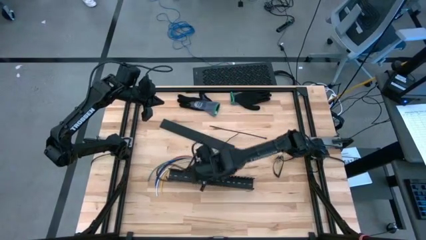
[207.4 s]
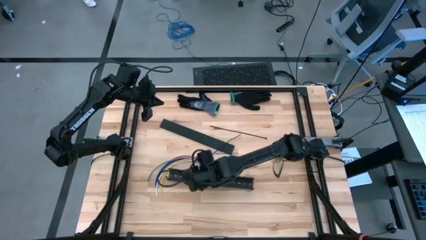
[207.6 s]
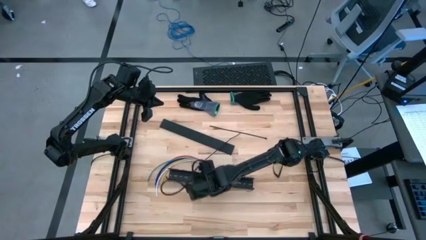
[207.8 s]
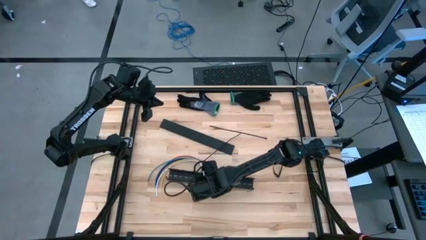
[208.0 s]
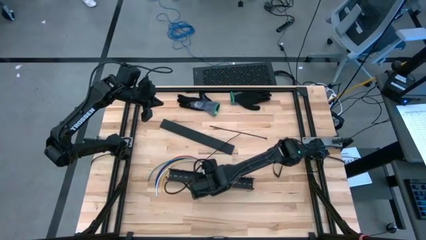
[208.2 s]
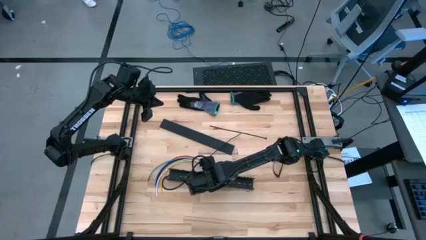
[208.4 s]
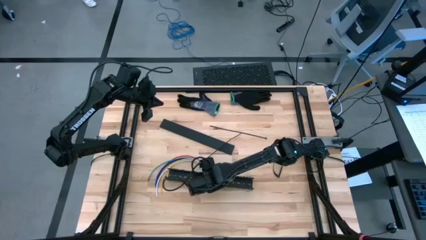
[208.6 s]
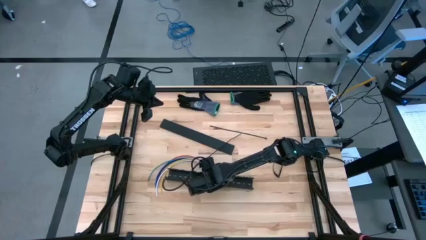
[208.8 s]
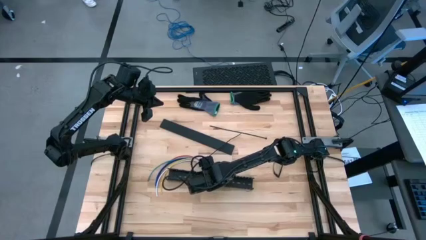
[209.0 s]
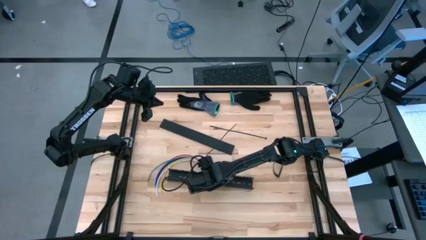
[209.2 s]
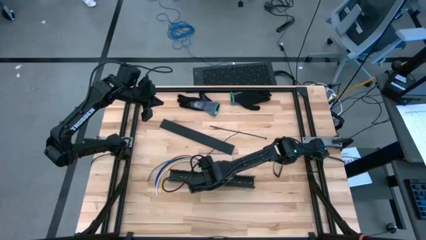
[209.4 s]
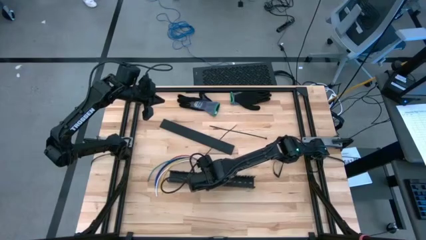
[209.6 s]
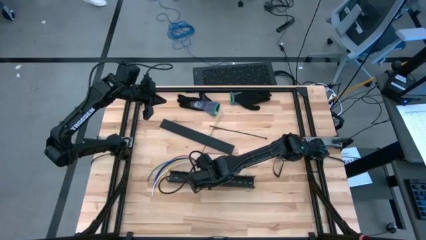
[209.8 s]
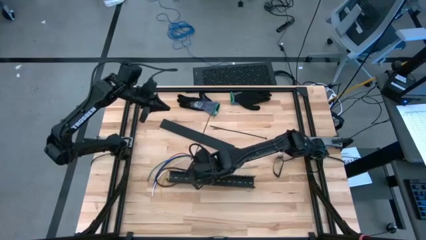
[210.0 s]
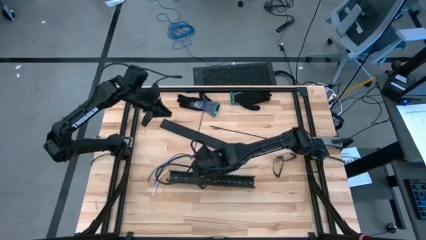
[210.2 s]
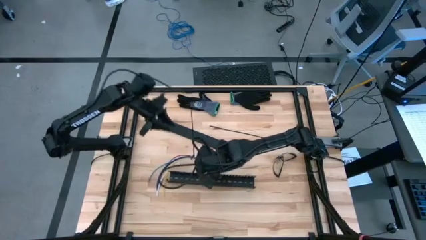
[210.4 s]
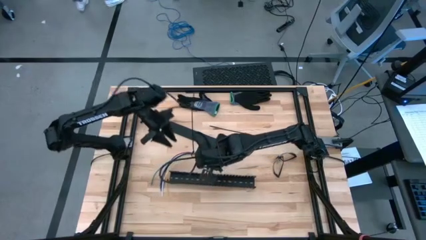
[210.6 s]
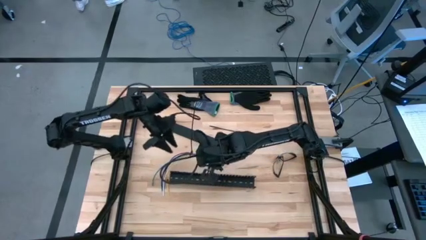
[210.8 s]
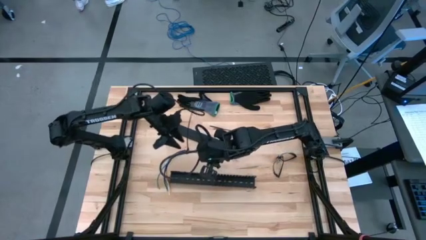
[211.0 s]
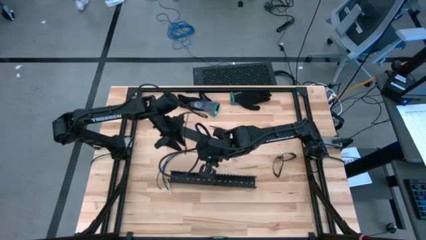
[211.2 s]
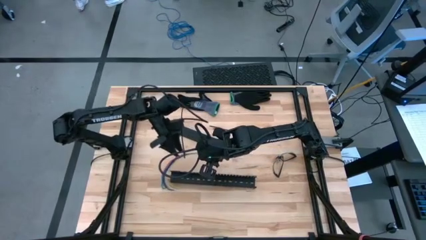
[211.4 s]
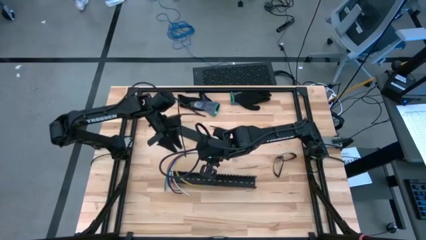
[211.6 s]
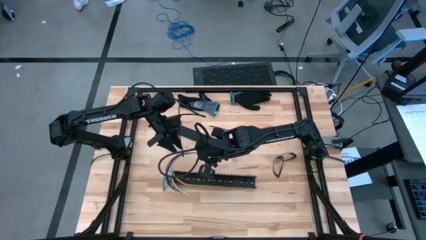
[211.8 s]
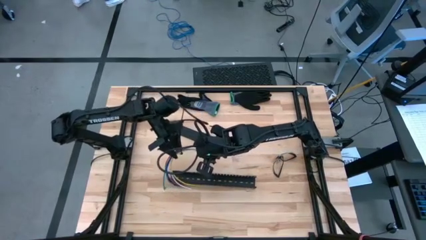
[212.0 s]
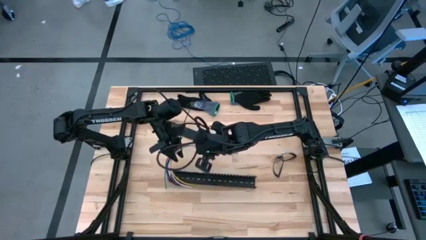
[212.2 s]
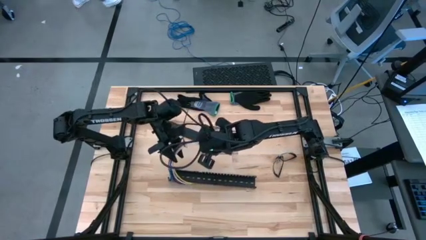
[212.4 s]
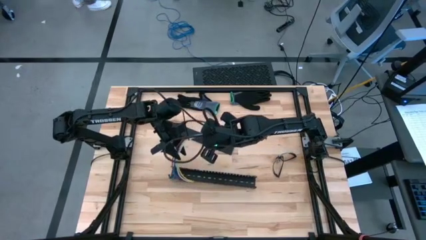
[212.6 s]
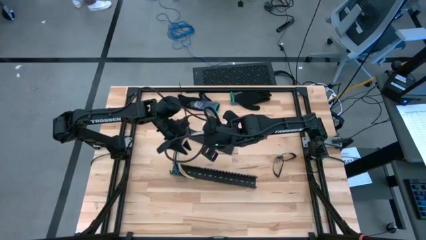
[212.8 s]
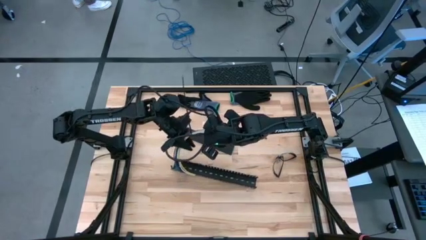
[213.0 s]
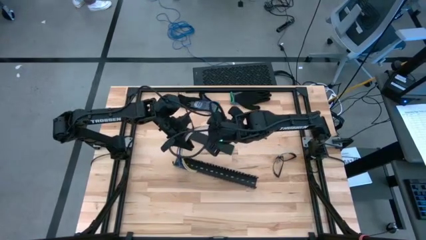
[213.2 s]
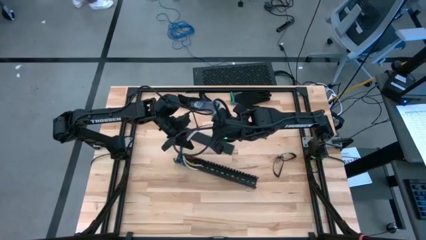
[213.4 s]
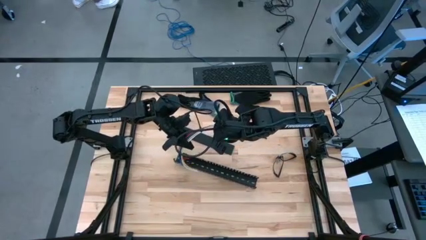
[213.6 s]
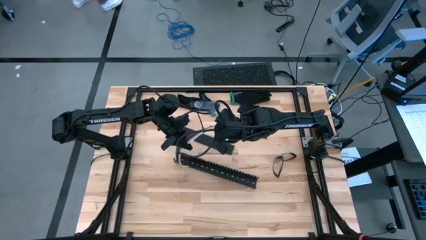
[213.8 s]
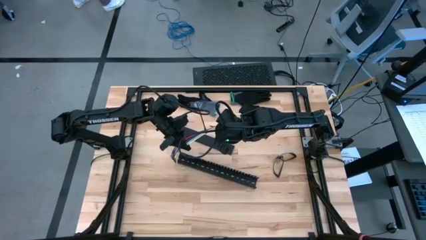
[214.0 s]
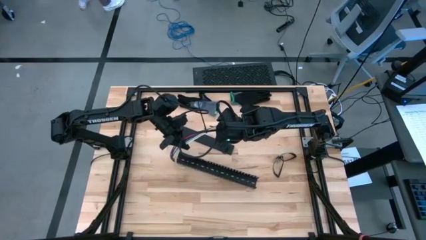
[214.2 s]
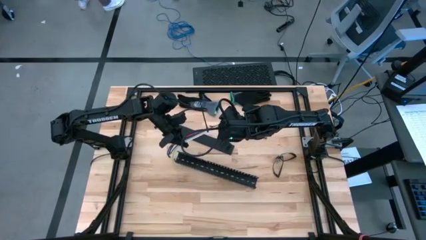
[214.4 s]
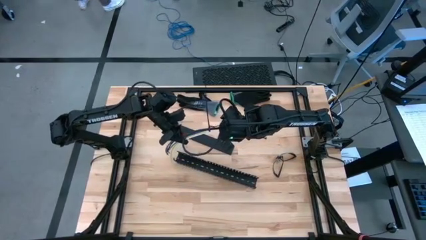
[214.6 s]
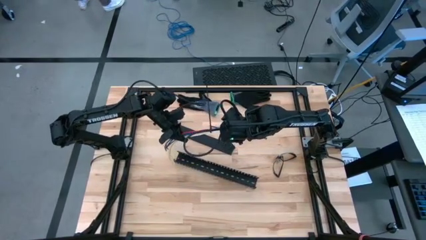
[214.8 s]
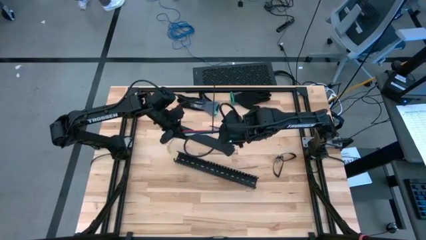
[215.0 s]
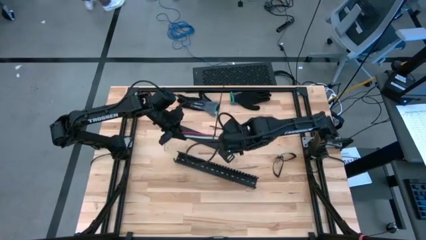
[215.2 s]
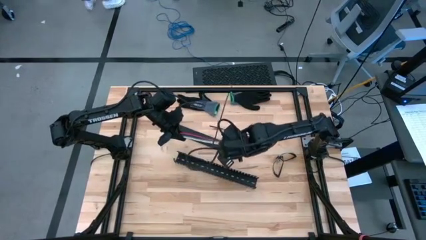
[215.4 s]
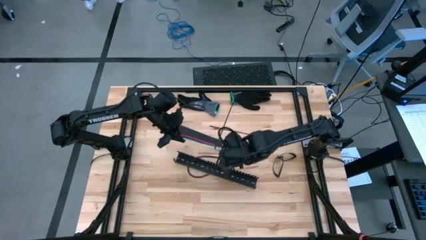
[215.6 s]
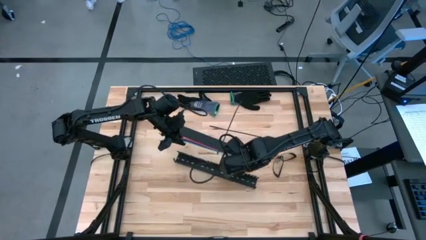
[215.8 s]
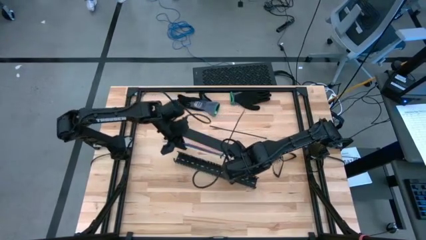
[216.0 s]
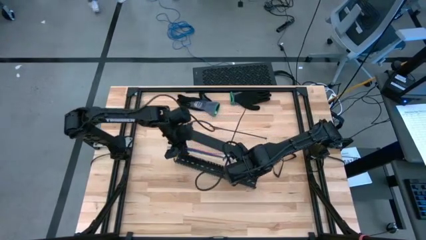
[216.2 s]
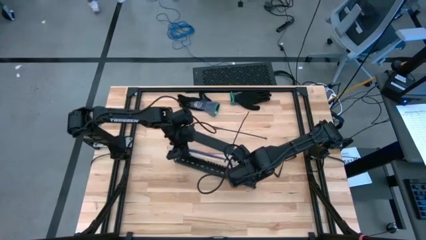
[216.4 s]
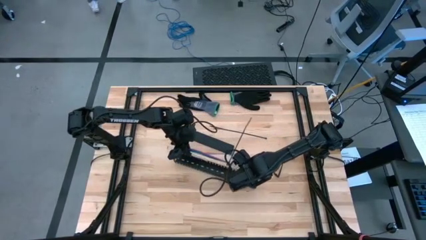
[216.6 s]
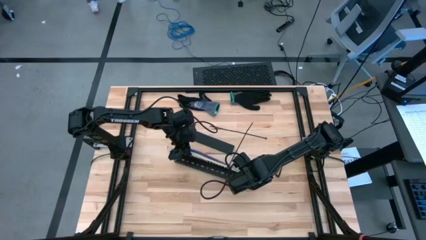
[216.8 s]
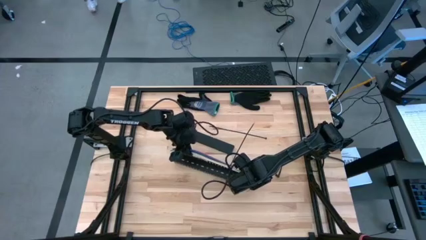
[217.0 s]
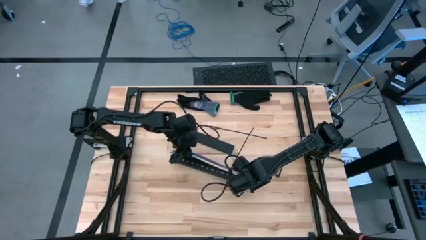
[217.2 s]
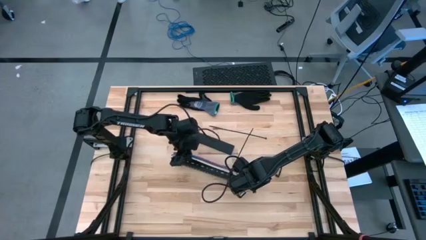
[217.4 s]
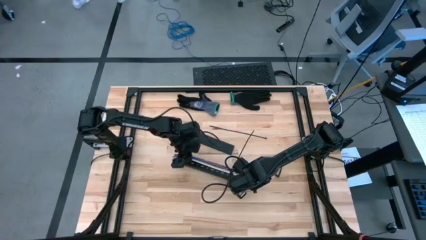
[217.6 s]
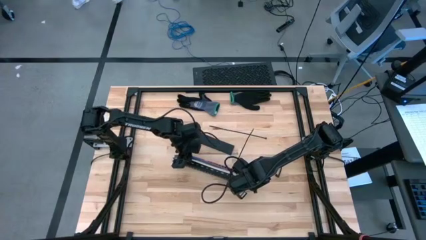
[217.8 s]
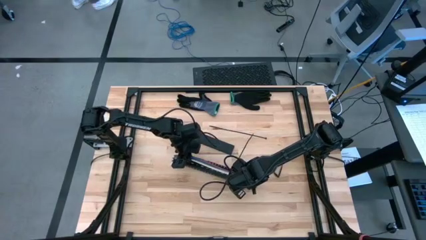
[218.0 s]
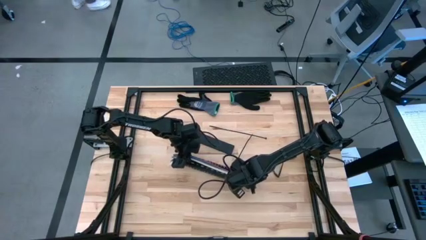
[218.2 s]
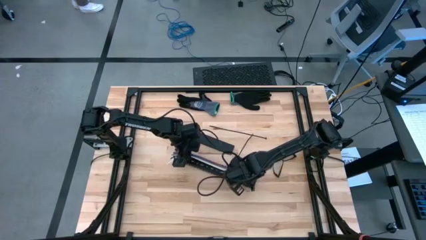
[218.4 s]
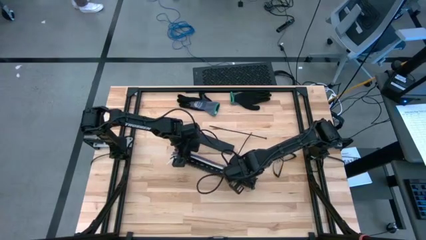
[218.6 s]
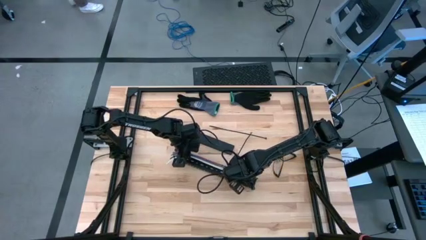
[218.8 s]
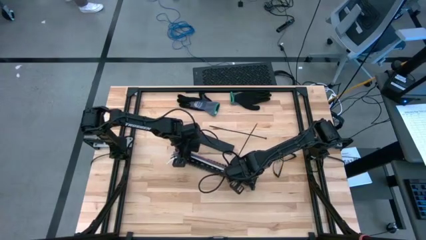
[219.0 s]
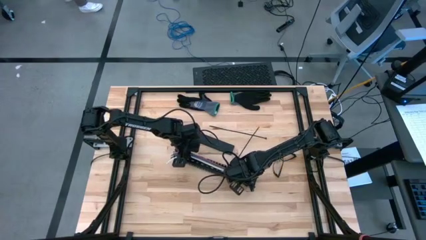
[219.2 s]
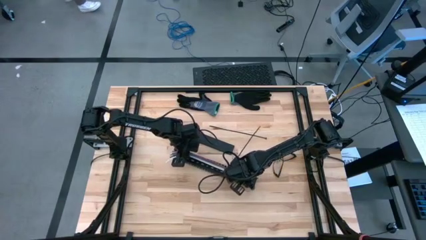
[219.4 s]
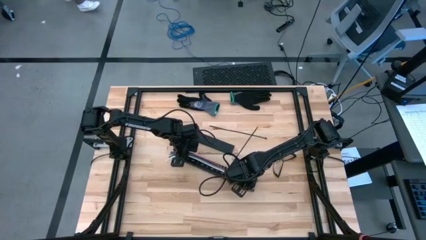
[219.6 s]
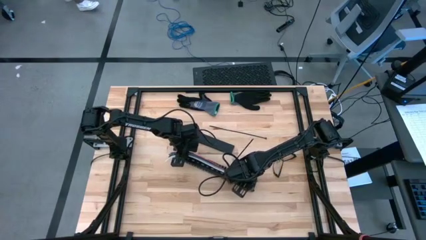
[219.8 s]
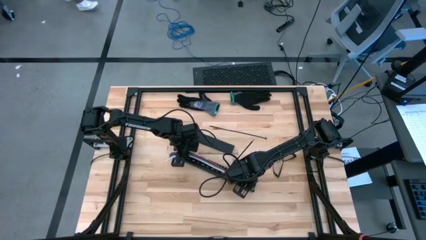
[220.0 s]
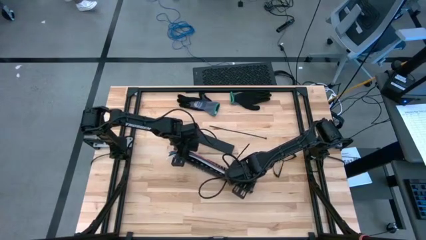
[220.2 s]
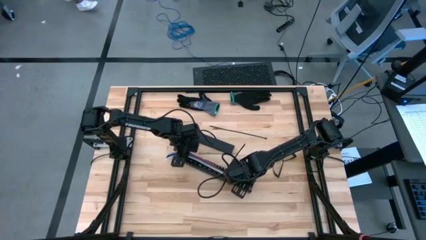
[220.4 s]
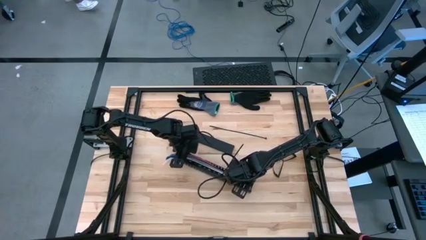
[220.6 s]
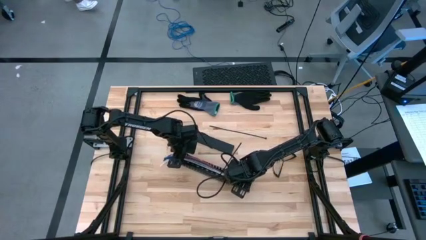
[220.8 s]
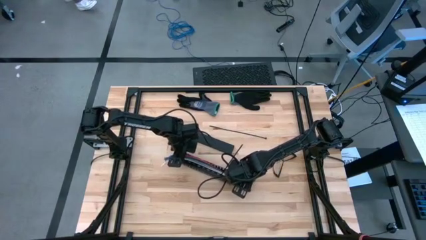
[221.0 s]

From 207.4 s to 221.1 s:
Task: Ziptie cables
Insert the cable wire into the black cable duct

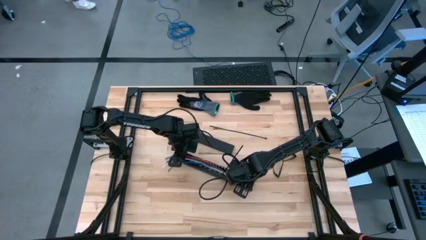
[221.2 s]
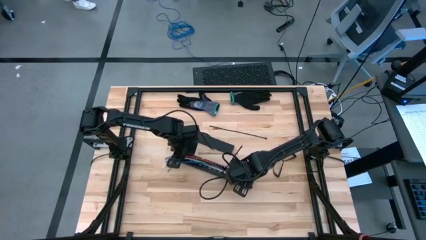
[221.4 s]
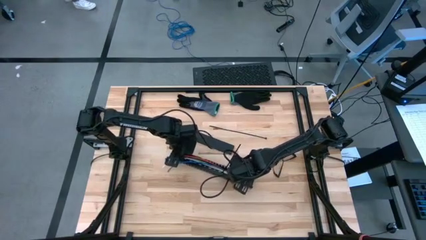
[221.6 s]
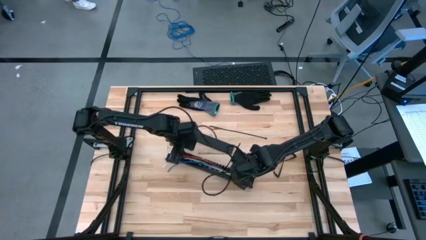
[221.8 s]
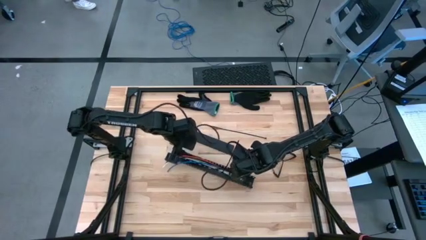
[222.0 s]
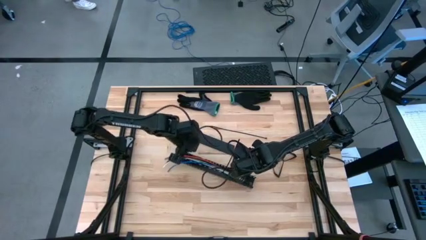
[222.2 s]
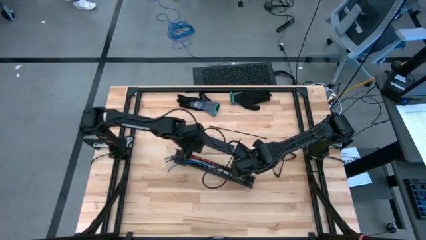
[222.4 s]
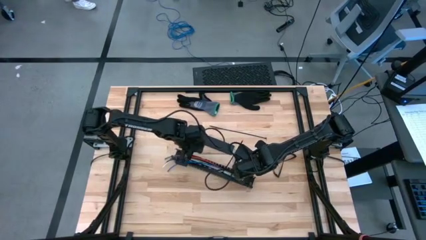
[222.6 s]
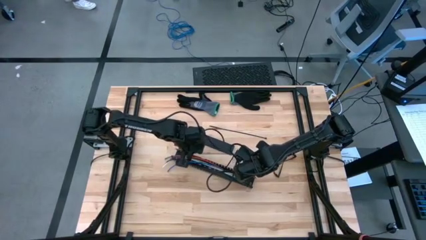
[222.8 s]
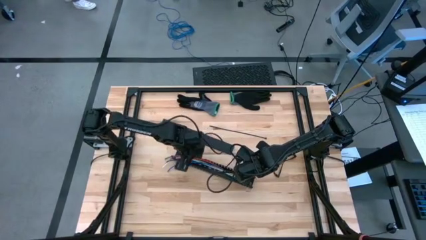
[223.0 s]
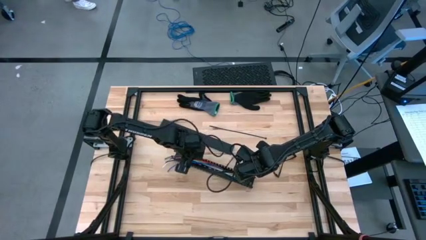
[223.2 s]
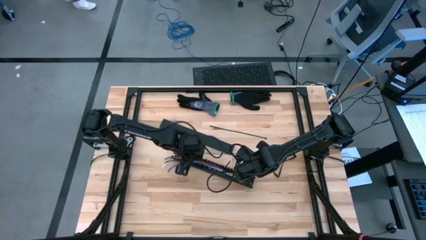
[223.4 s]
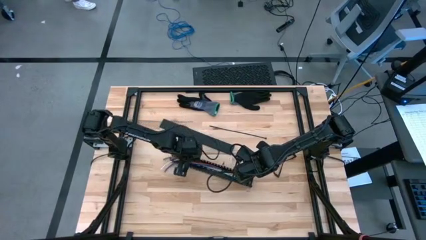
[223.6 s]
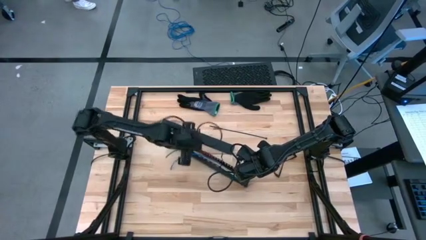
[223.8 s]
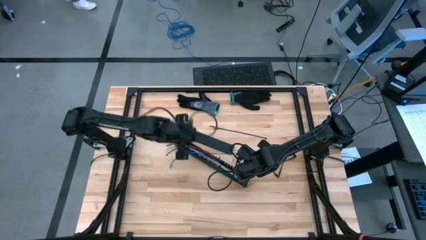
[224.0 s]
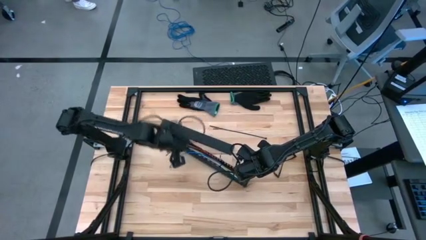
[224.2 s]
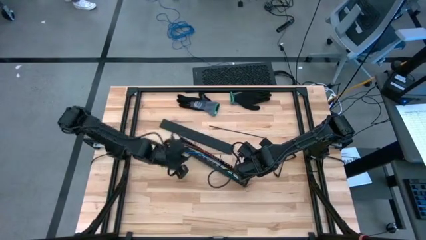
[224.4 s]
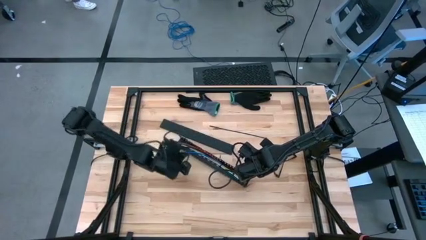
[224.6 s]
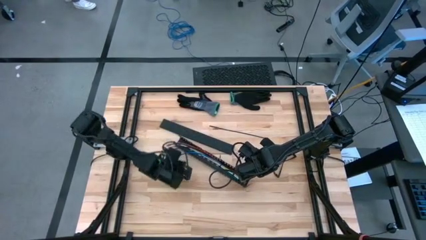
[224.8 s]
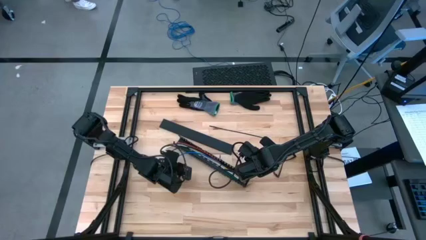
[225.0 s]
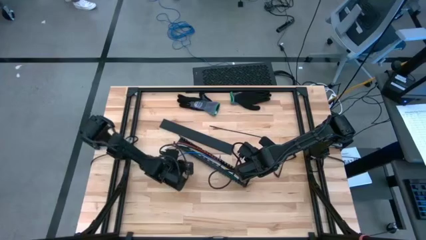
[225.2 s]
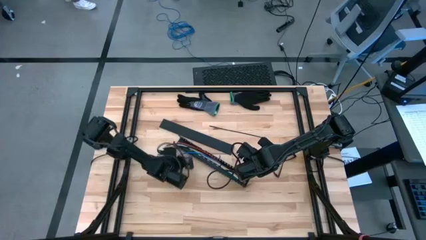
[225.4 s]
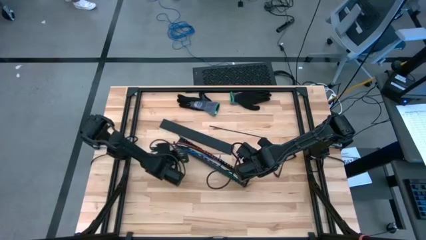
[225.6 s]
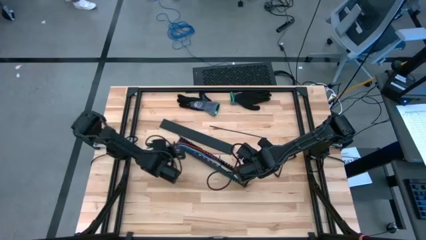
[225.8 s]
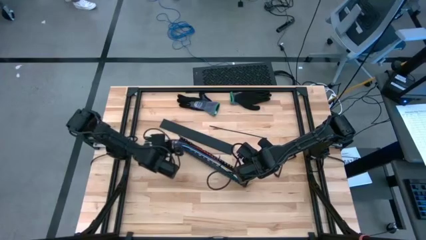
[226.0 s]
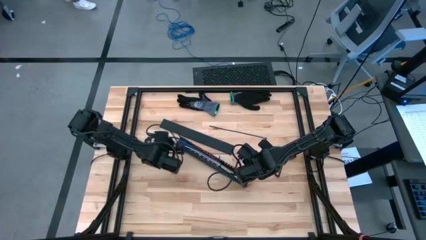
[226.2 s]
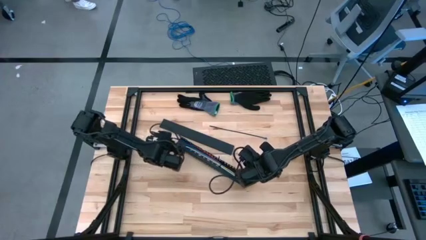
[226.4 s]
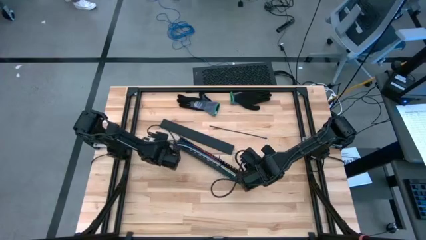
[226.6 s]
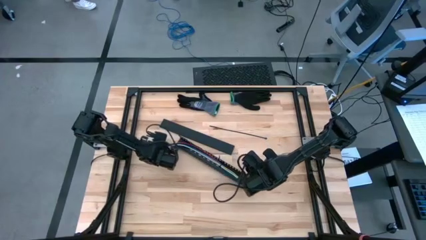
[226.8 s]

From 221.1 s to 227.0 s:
Adjust the cable wire
